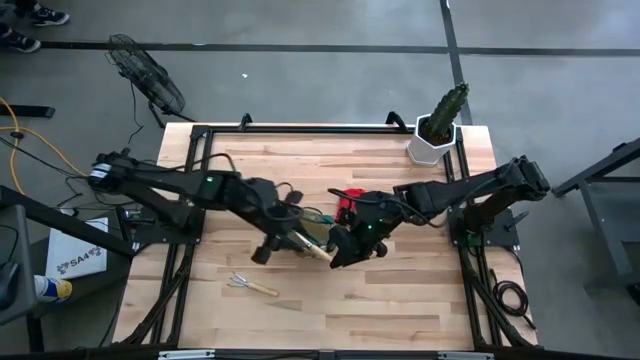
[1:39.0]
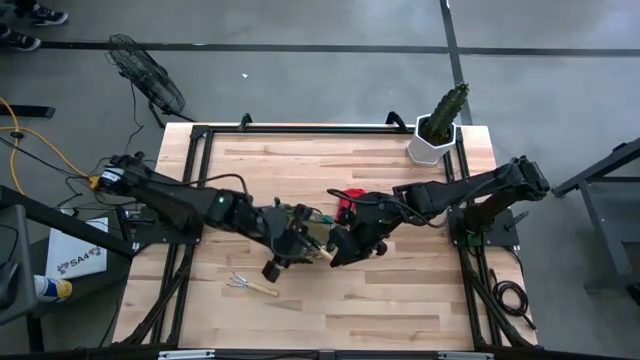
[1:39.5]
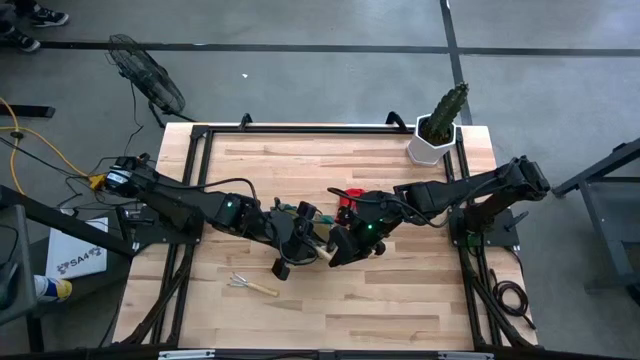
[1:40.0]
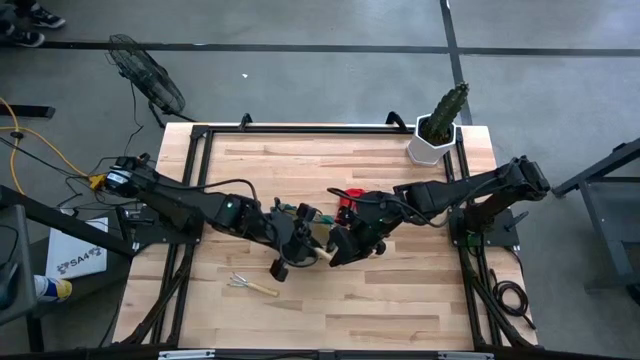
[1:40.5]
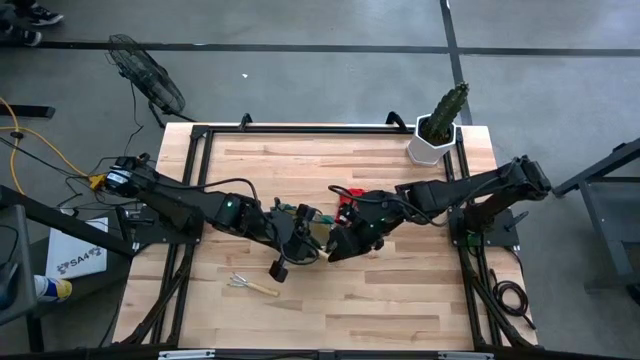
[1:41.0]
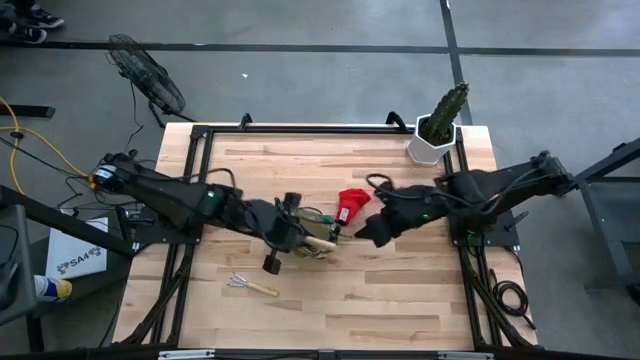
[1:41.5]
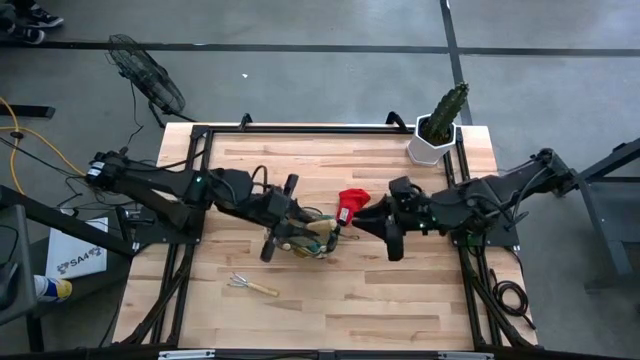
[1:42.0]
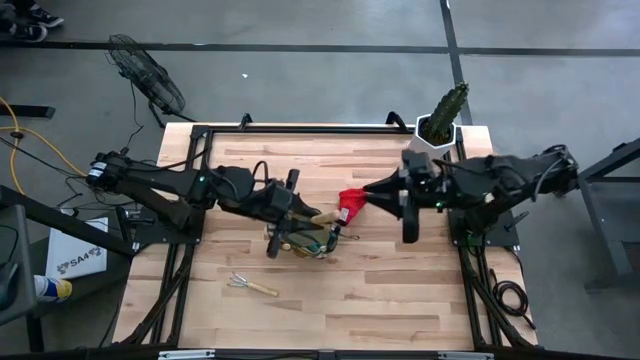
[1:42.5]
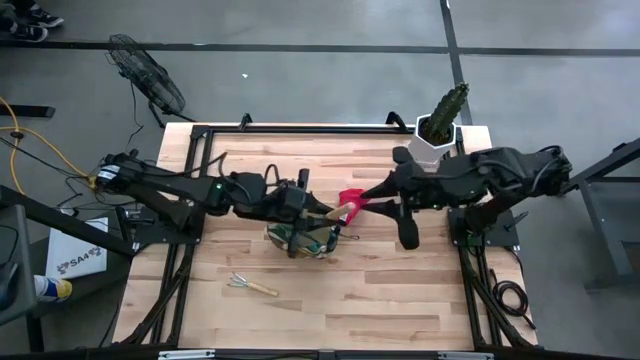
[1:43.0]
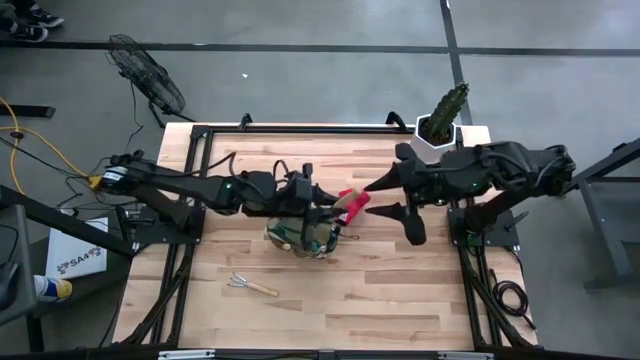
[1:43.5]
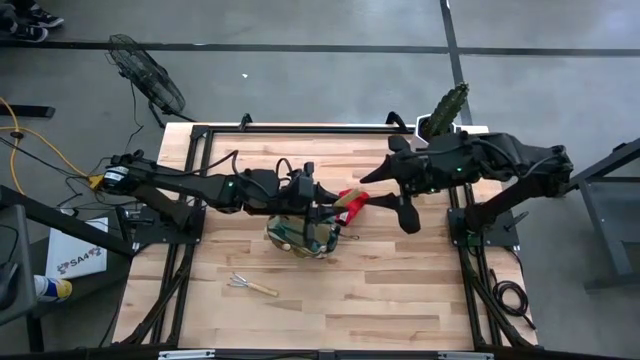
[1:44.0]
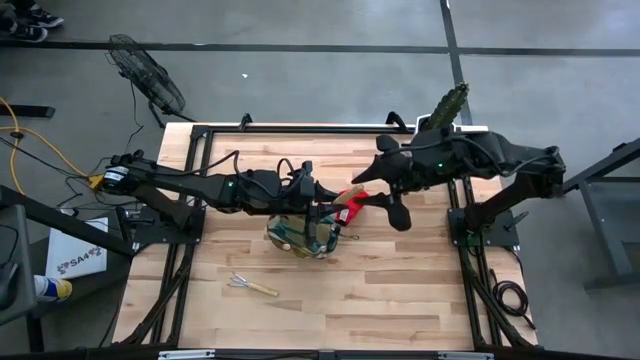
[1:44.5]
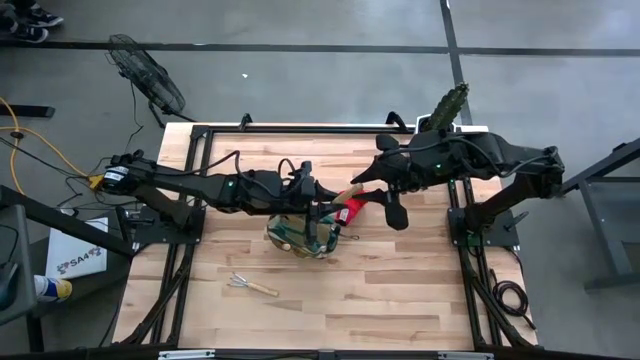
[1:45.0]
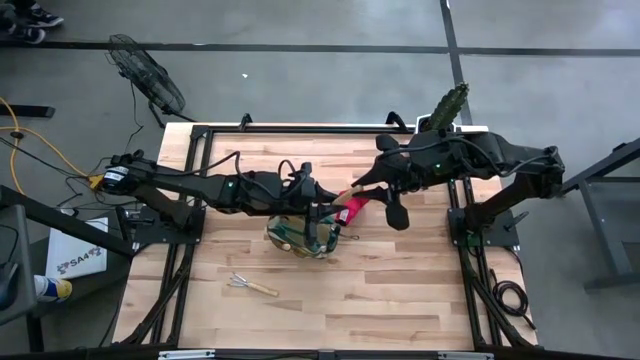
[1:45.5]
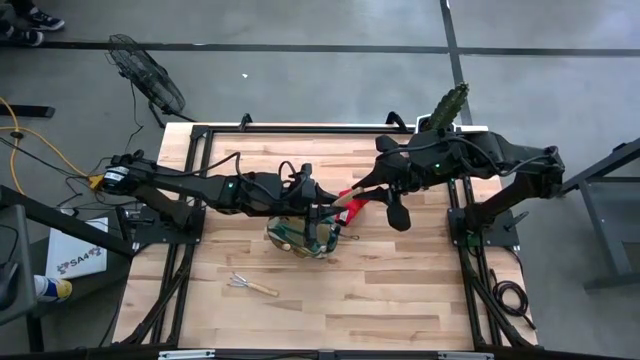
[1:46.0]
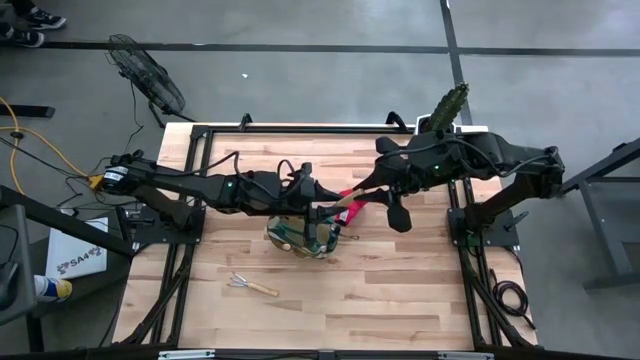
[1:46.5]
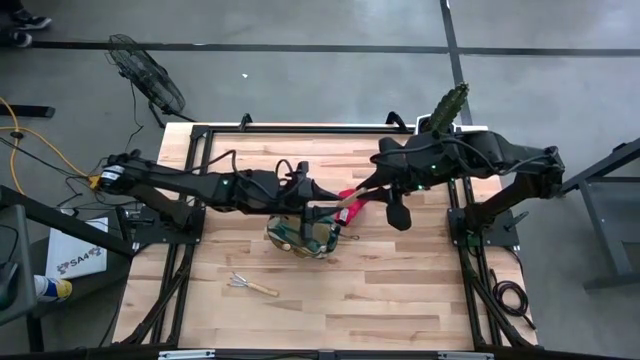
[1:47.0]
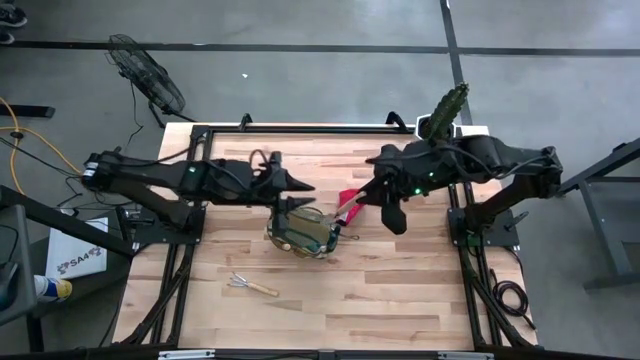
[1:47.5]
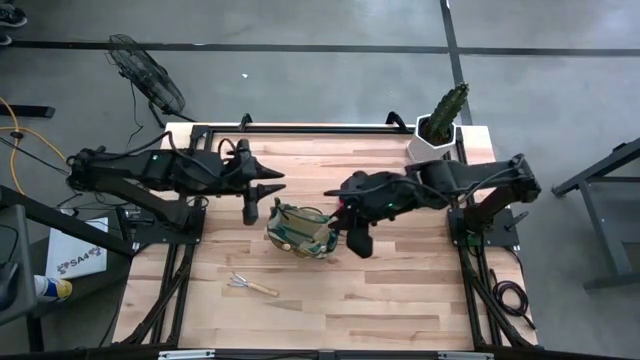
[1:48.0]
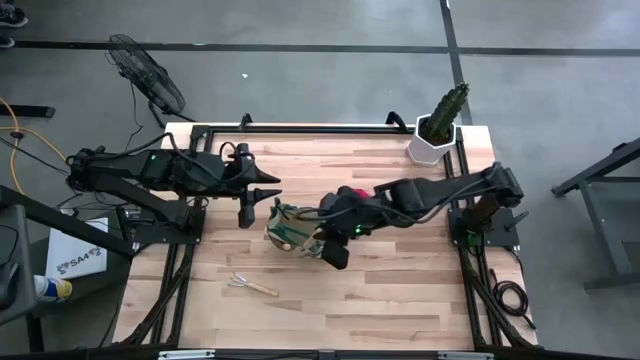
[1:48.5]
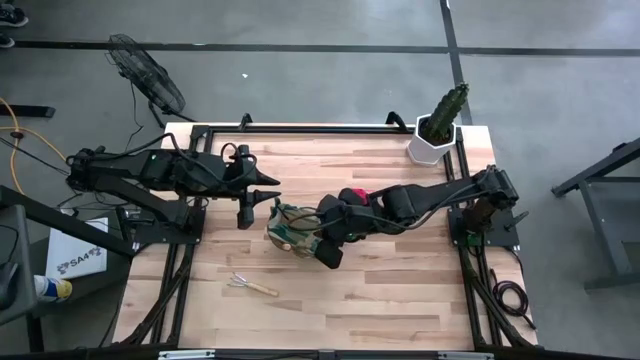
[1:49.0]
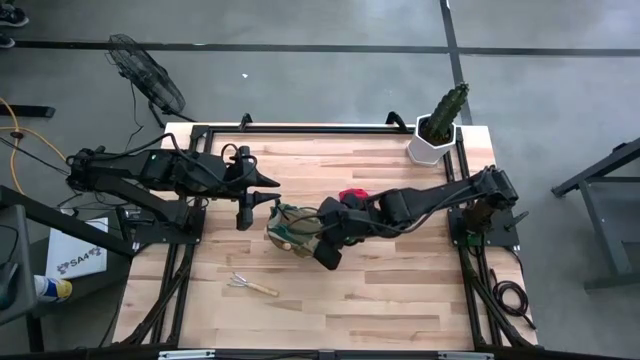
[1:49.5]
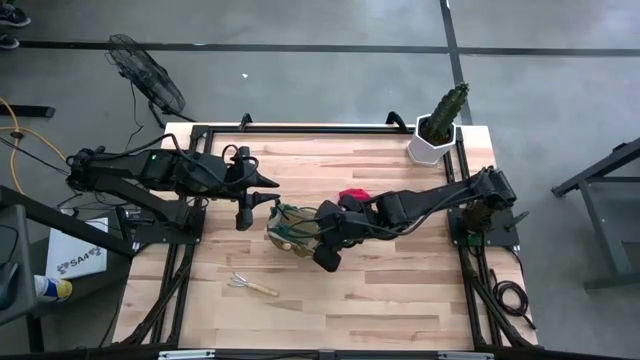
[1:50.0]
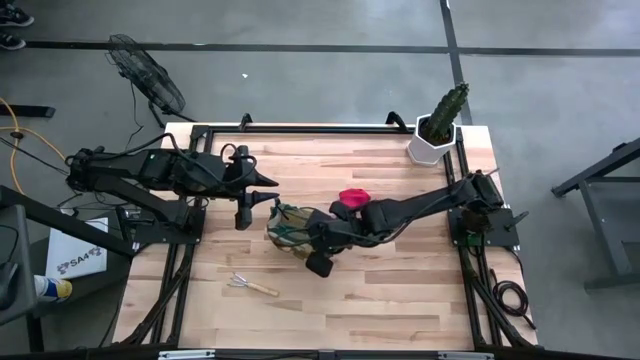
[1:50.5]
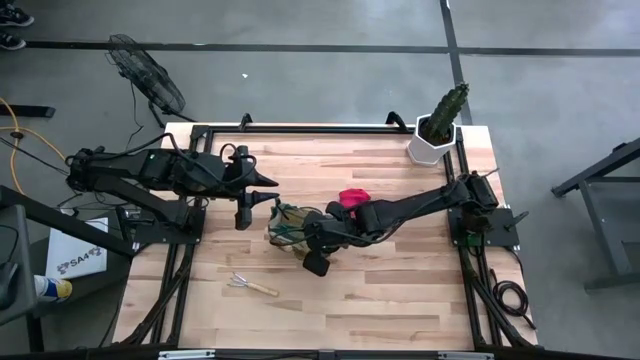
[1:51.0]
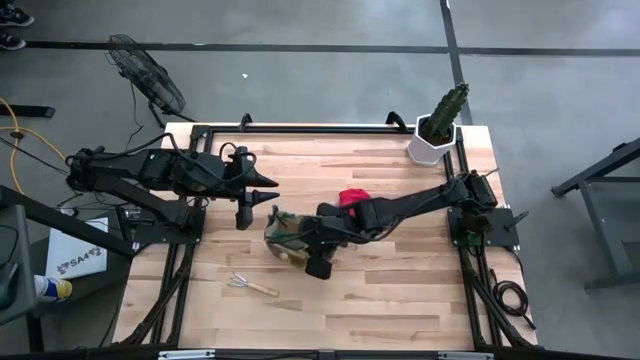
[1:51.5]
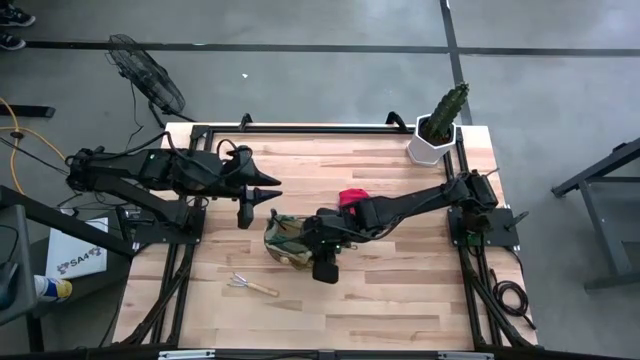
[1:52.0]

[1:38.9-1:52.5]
Task: Pick & Place Garden tools in Gardening bag
Put the light brown trowel into the gardening bag

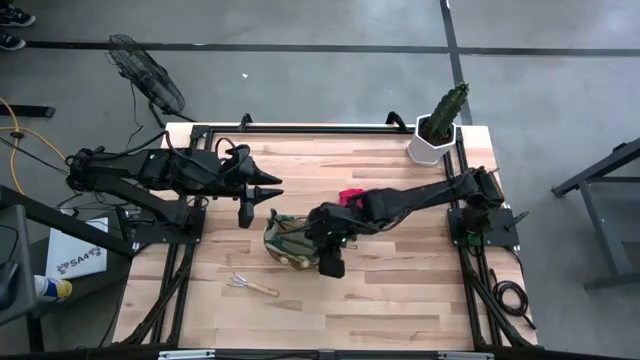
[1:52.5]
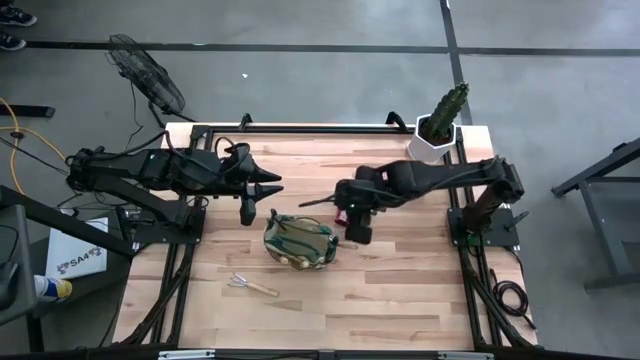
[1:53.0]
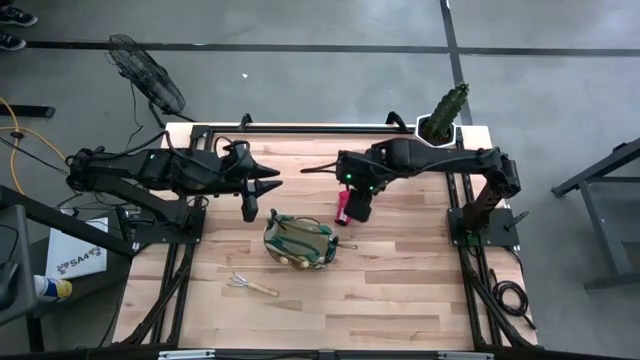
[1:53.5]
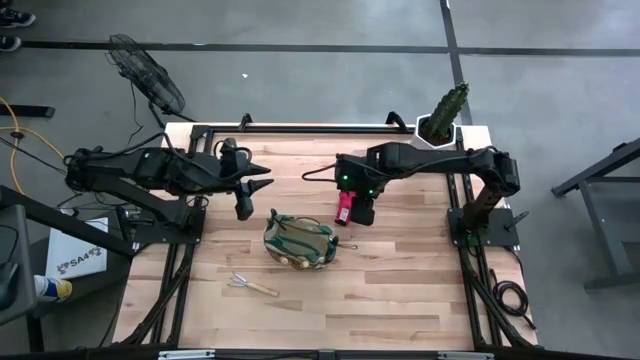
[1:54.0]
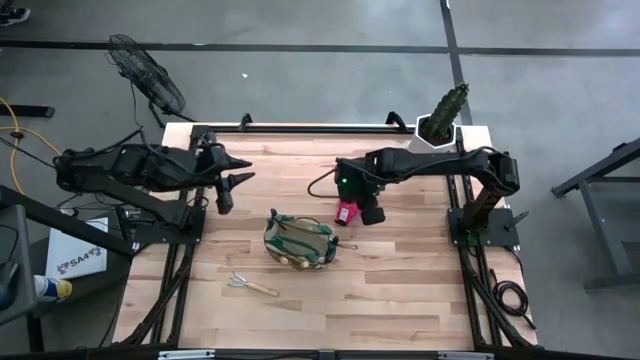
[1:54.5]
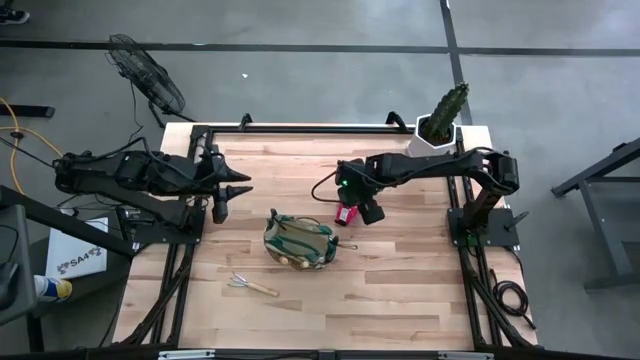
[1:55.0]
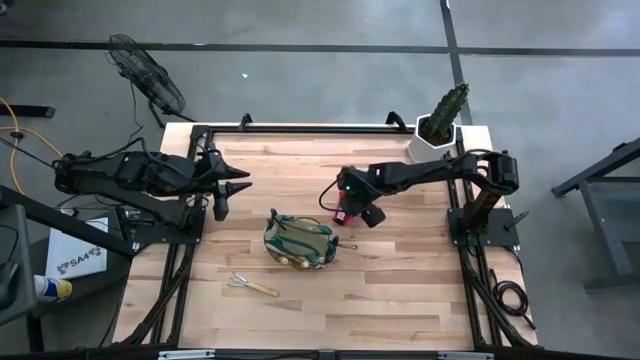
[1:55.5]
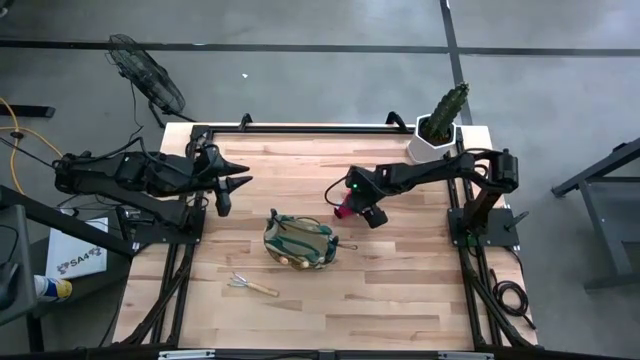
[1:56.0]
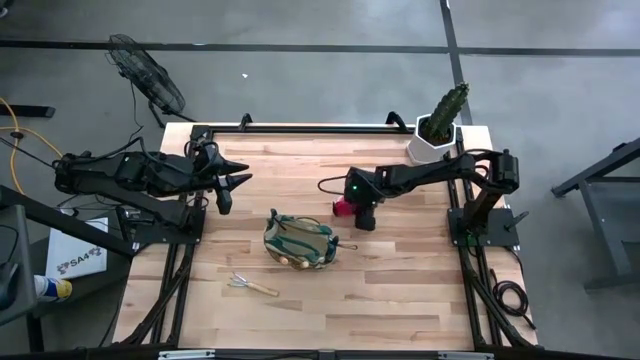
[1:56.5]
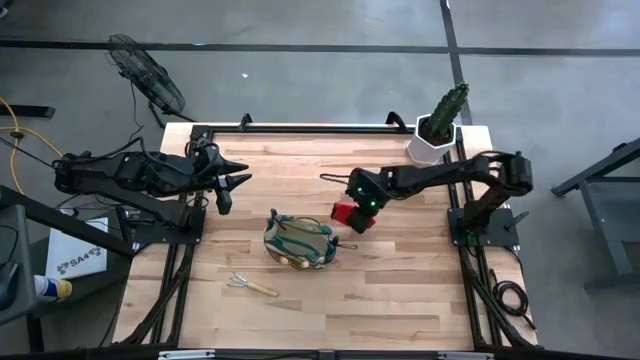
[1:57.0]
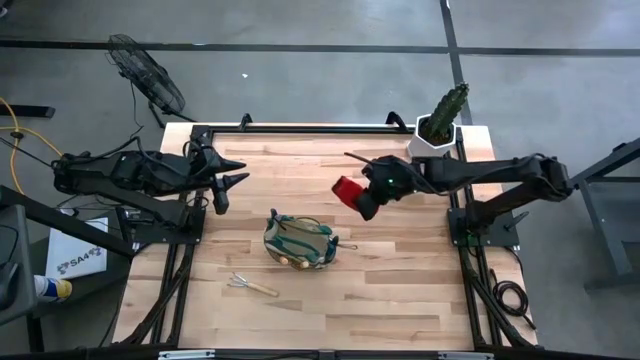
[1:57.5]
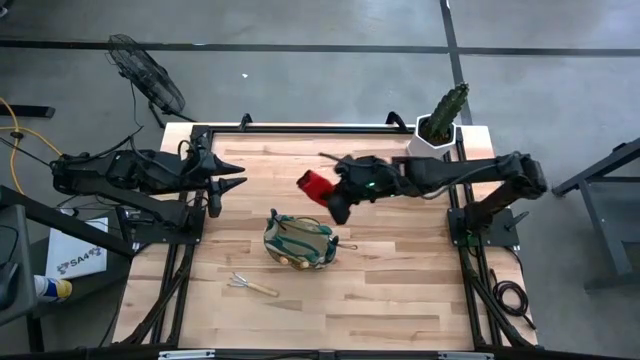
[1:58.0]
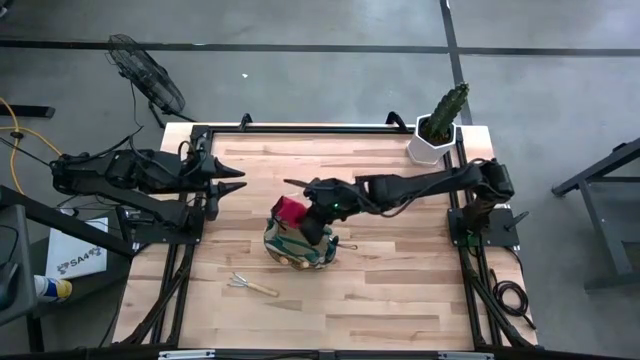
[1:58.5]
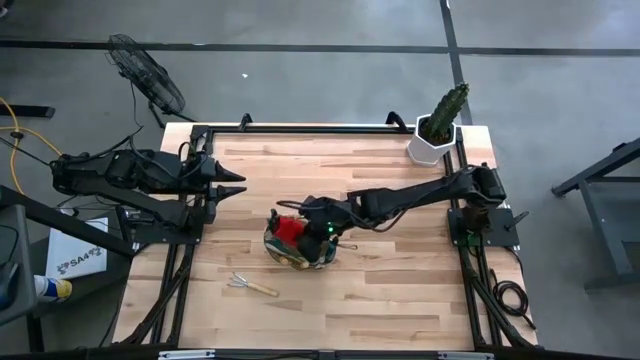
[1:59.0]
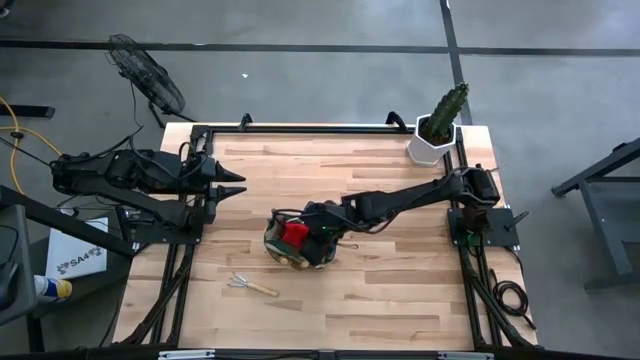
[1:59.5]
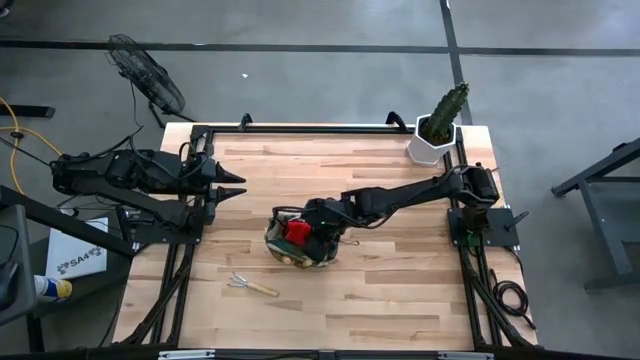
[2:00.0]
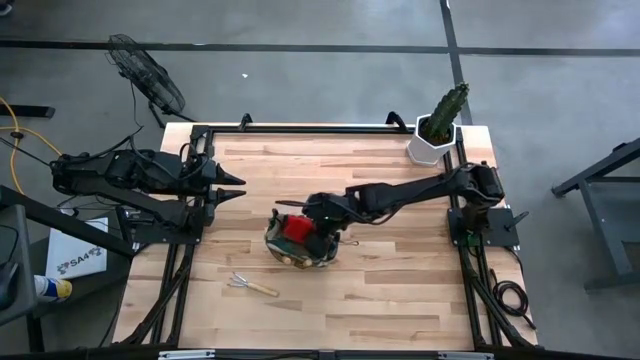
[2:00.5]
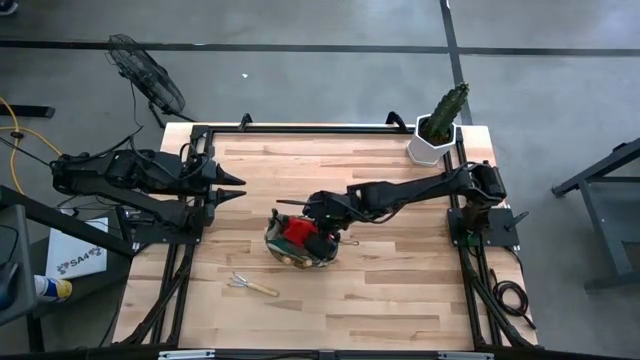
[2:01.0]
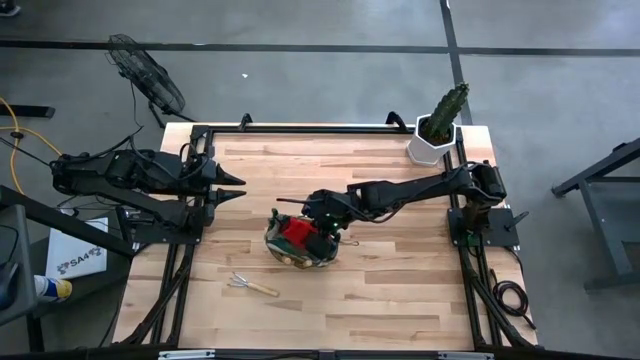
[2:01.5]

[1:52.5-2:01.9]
Put the red gloves into the gardening bag
